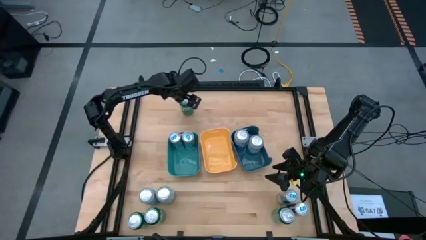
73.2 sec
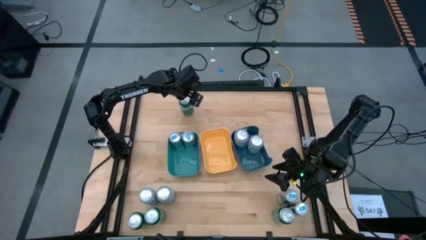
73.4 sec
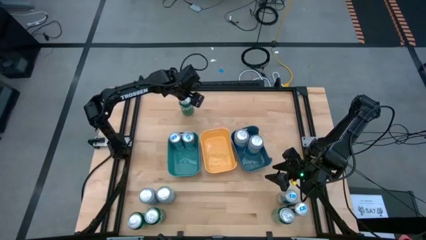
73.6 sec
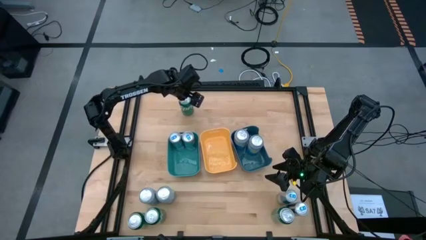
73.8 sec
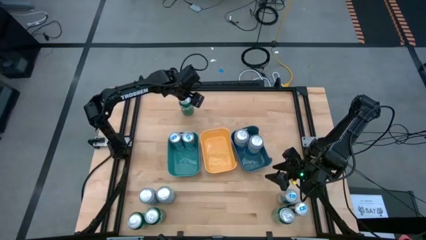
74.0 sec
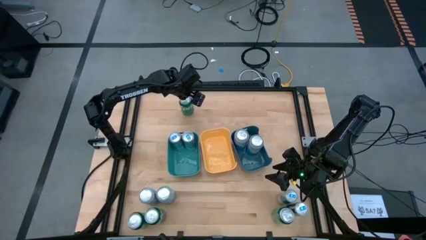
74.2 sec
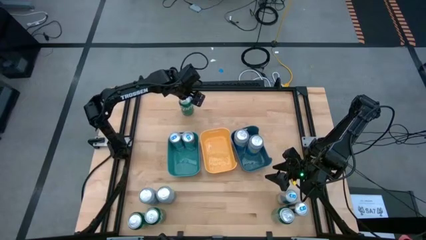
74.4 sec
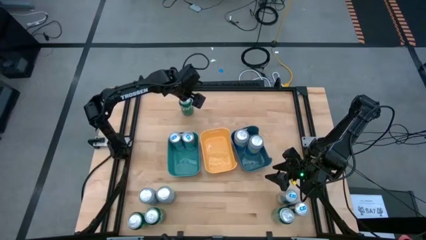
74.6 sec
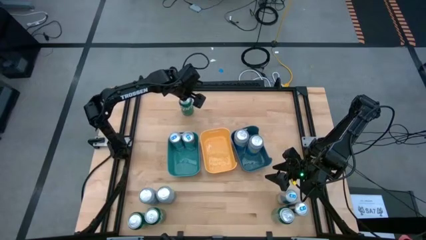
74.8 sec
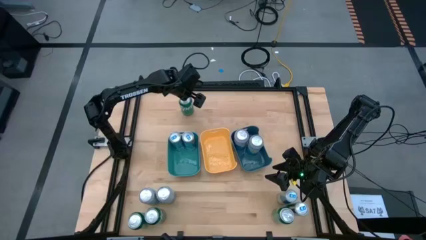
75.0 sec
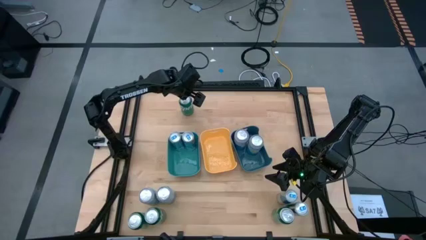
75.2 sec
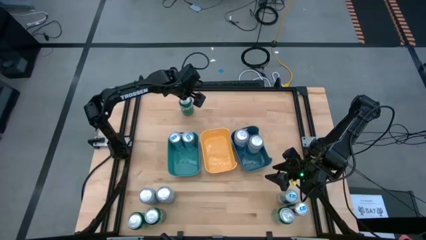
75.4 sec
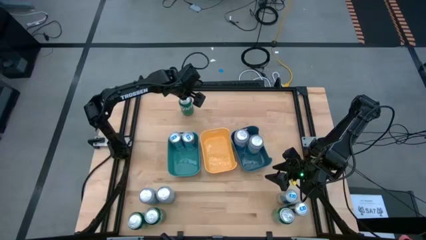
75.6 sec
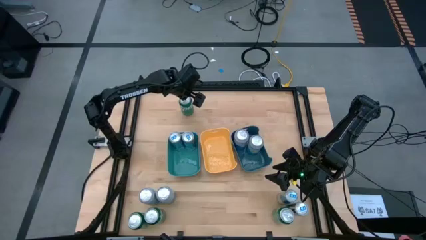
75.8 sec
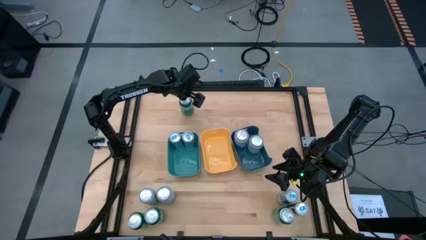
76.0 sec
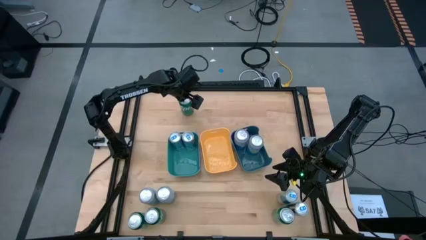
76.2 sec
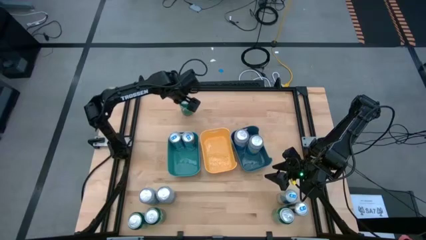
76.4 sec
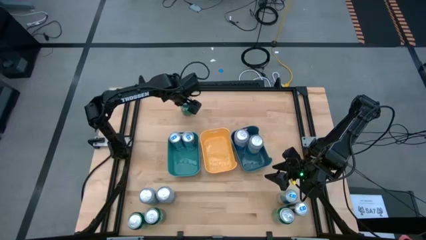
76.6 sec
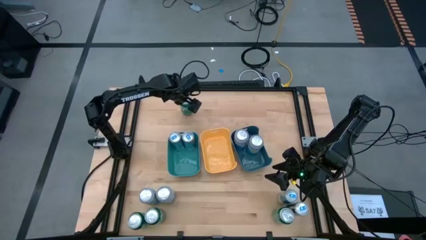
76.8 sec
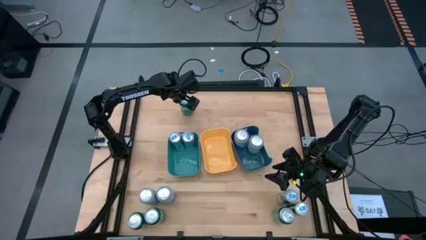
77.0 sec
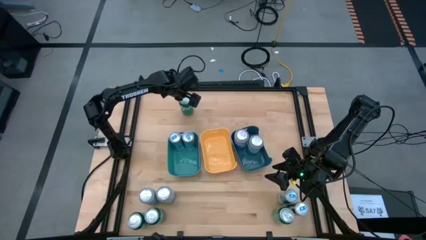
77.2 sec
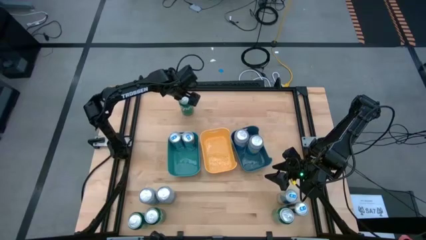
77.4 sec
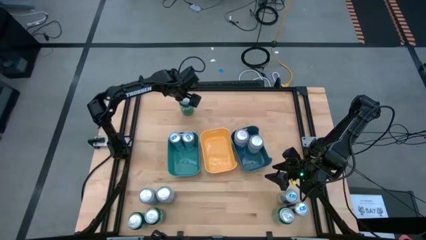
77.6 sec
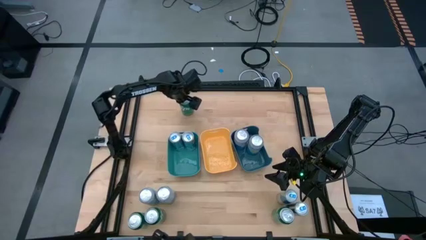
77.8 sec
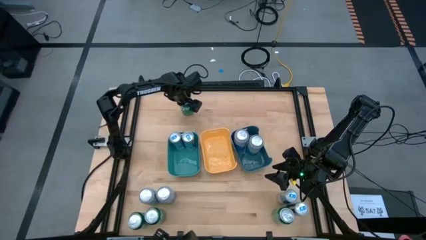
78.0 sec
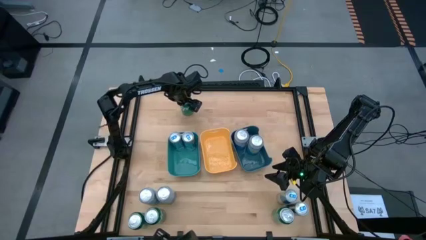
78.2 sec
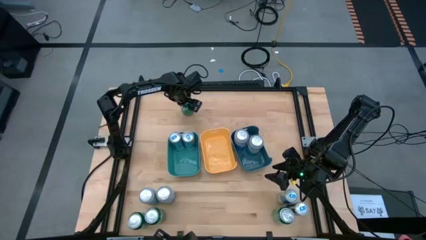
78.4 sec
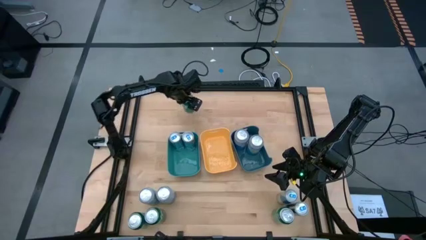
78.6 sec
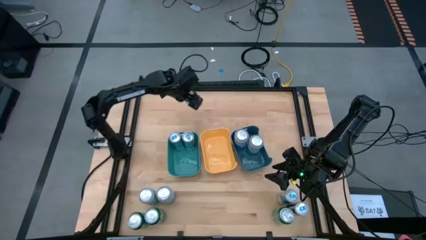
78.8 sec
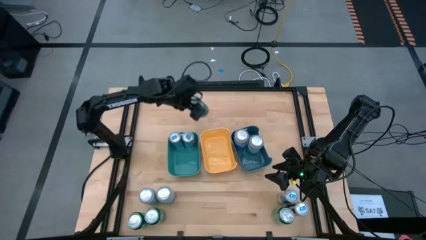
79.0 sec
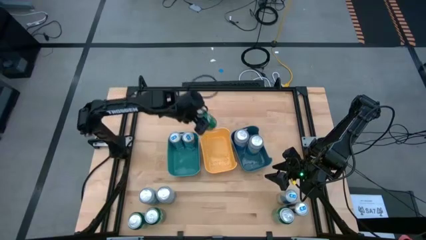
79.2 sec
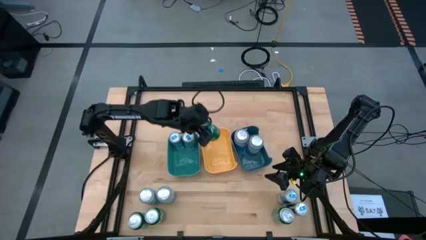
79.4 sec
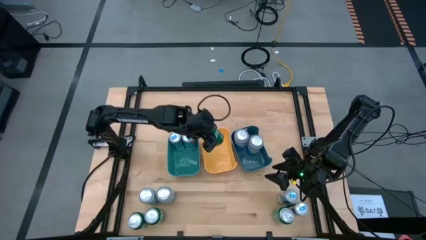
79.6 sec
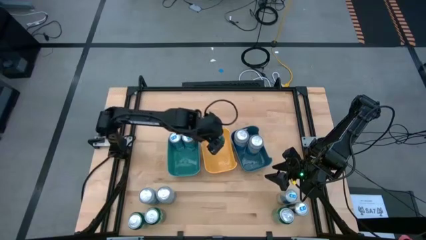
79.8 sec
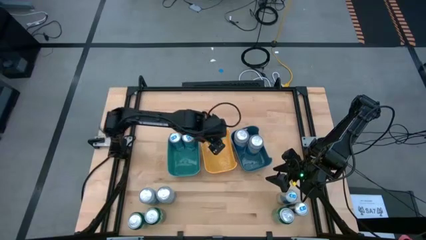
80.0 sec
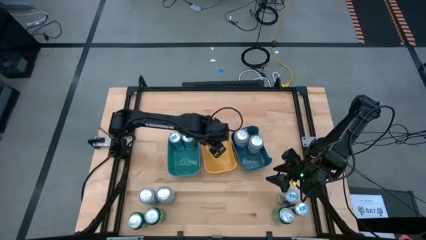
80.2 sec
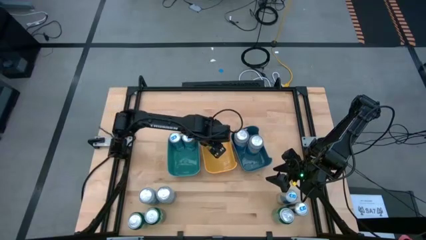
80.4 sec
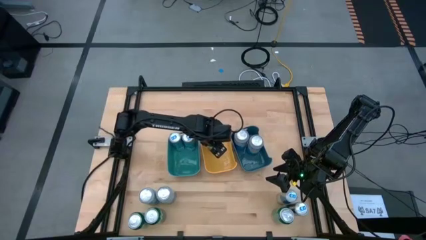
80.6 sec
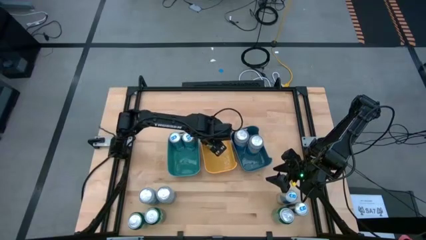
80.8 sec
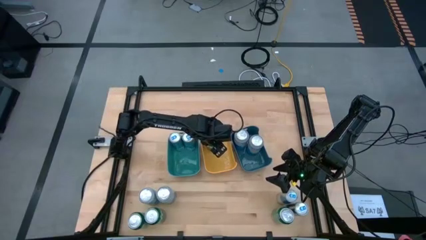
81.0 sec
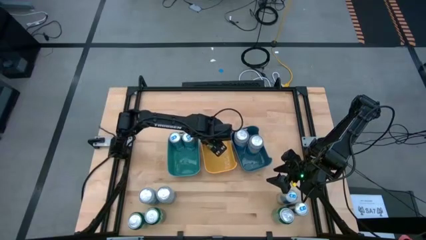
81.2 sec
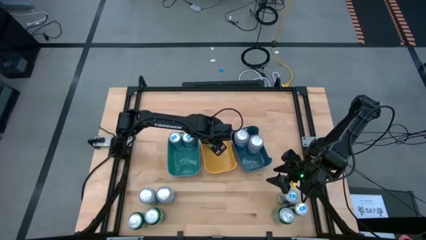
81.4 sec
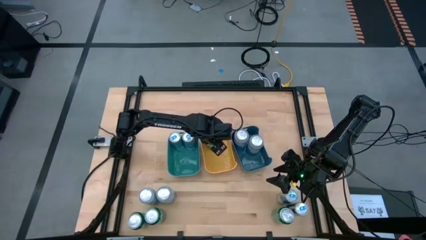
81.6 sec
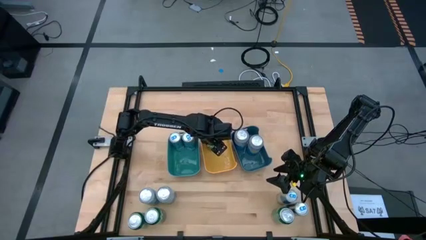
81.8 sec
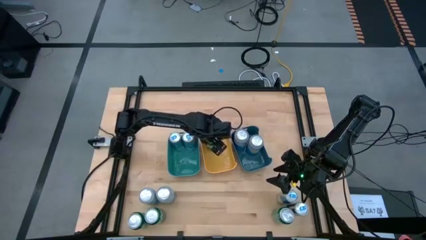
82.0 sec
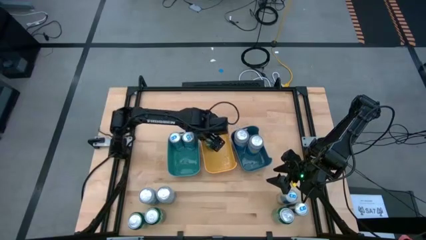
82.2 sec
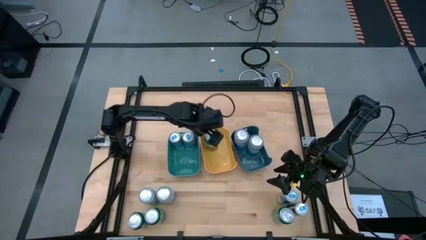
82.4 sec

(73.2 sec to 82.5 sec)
Task: Sort soda cans
Put the green soda can into the yellow bin

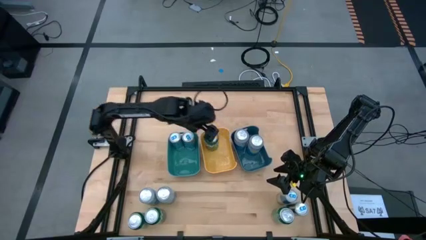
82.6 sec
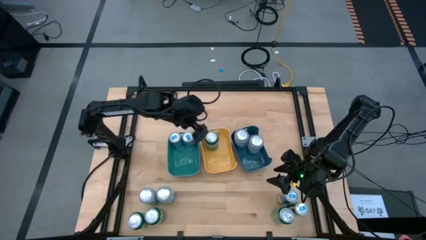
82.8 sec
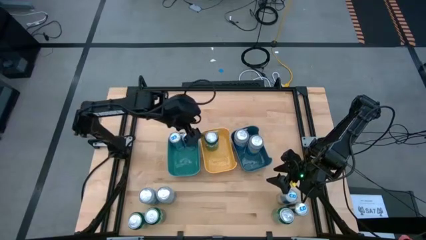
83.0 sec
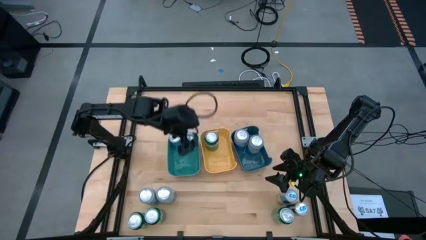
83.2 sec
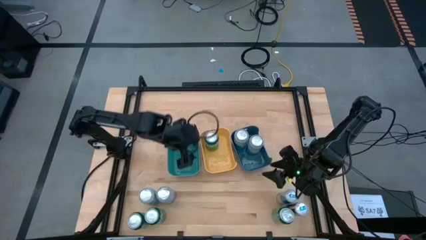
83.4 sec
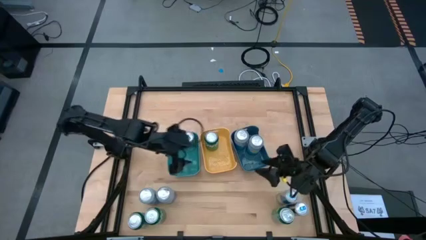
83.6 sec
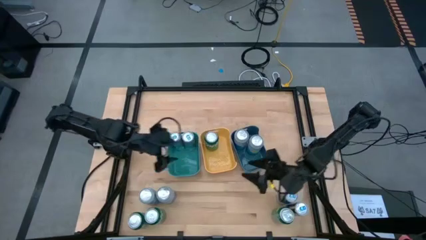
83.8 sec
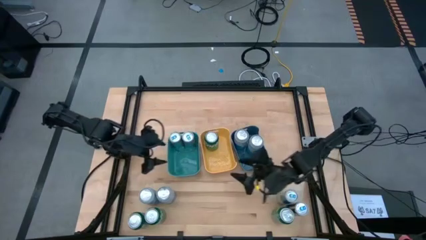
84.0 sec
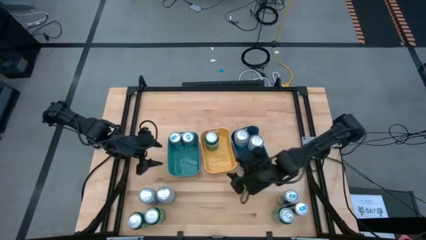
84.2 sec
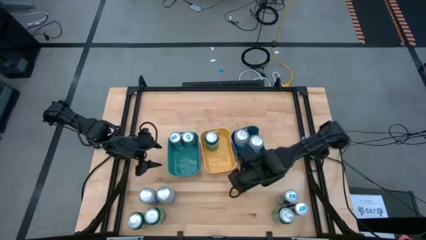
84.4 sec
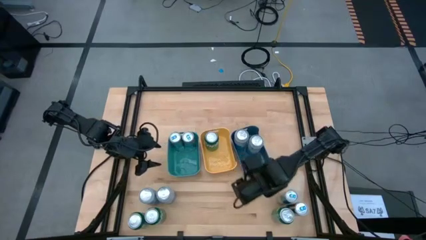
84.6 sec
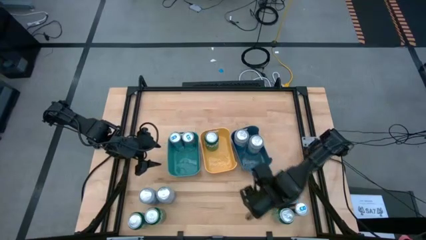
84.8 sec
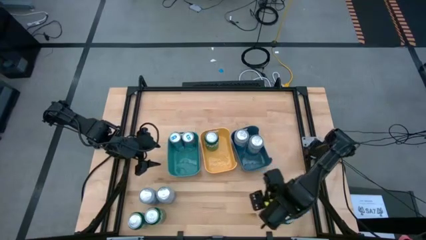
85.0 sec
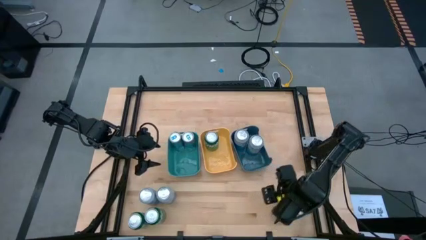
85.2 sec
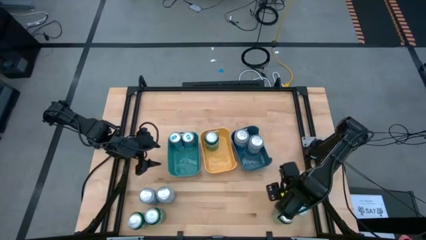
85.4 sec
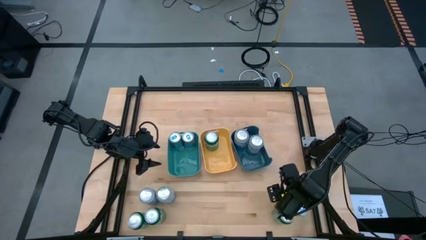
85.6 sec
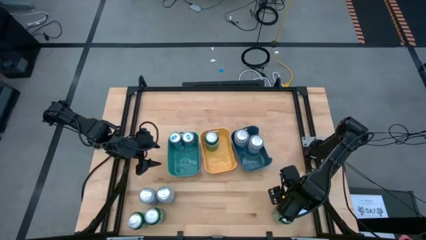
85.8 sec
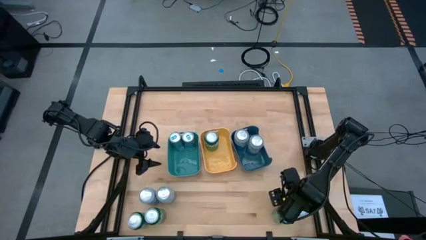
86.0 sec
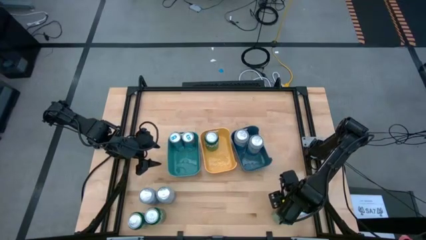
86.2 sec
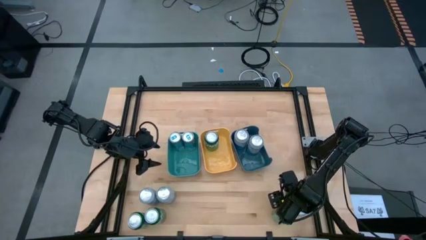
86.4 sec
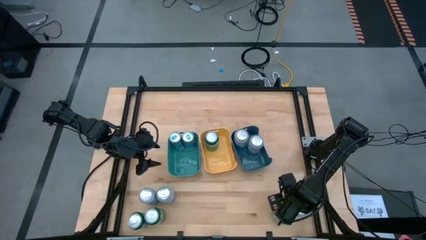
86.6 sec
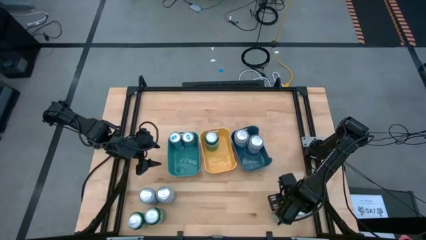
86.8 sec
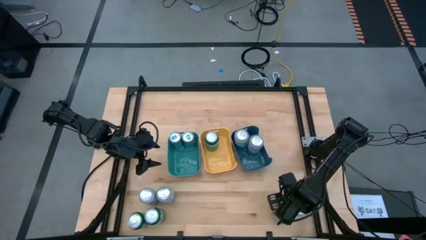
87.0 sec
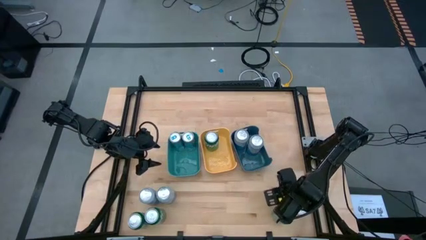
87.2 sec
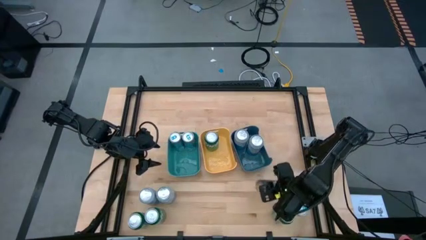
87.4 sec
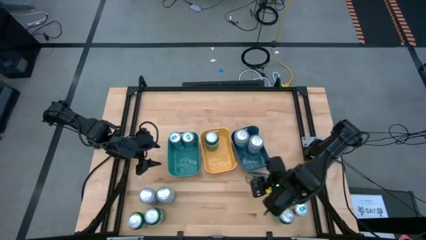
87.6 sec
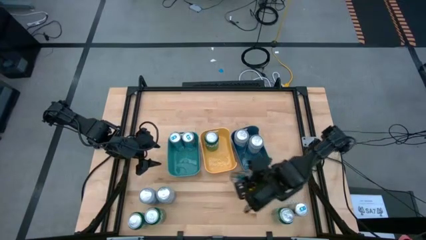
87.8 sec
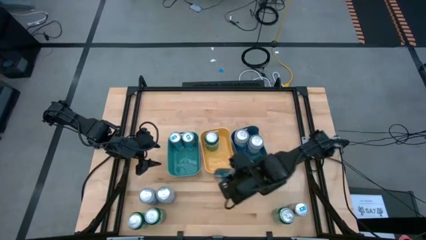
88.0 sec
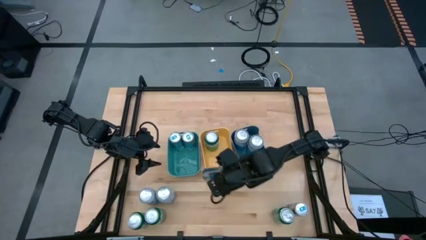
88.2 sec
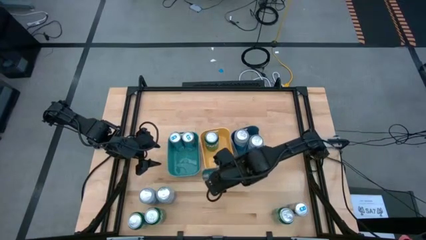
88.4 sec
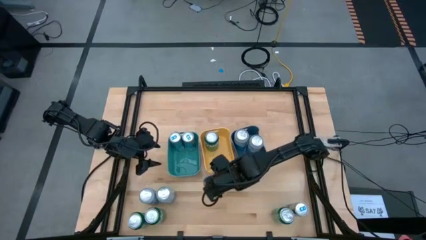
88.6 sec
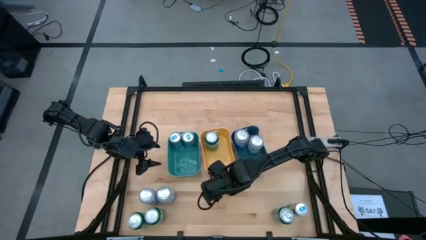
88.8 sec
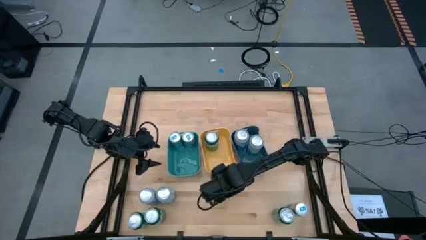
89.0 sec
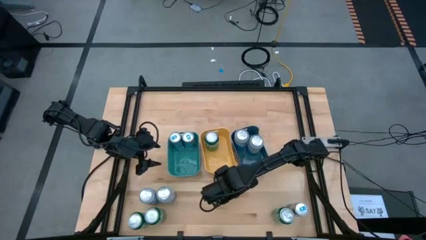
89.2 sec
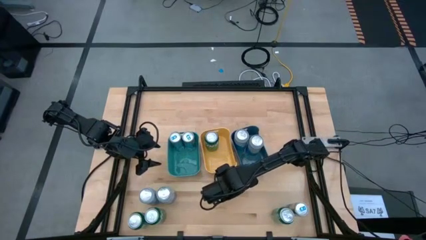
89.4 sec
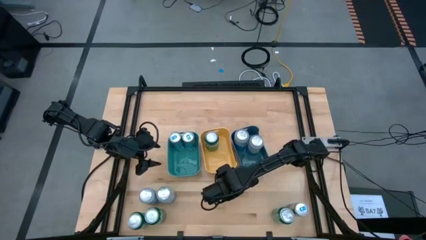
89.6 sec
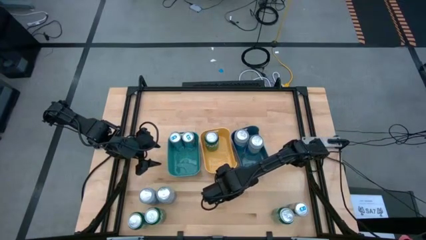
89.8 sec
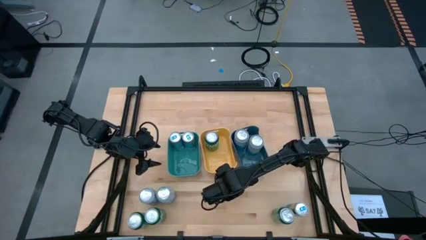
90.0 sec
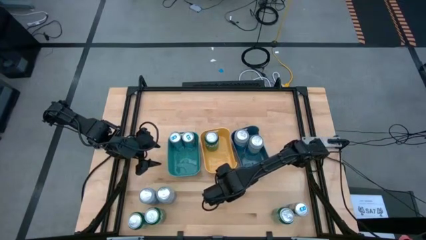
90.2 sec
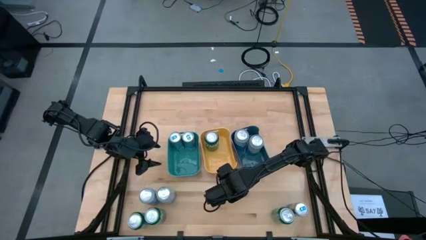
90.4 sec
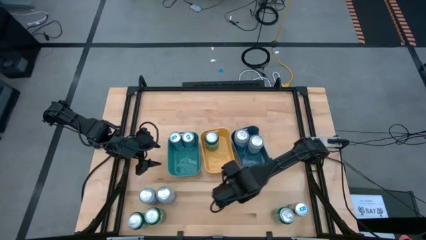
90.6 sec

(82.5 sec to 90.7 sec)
Move the white and blue soda can to the center
